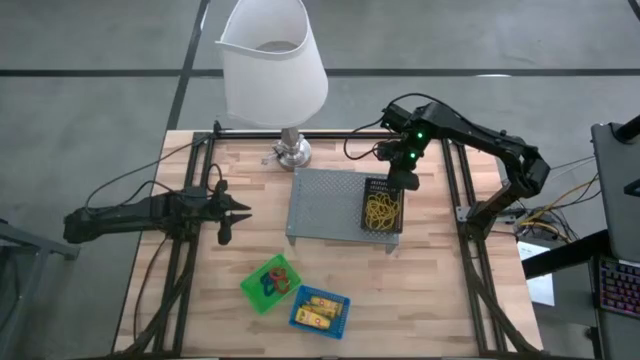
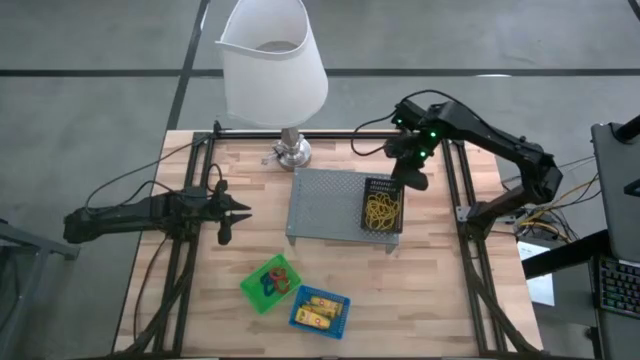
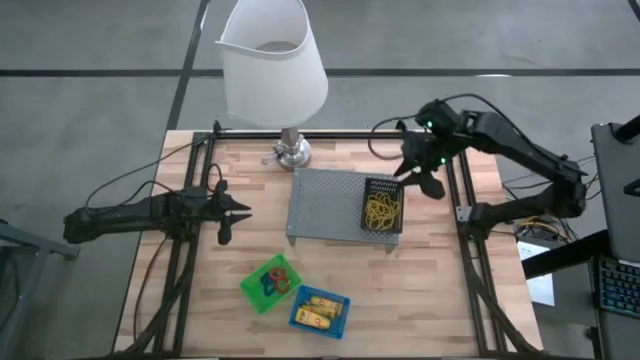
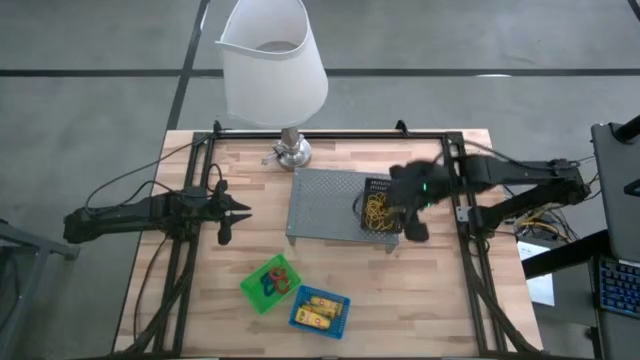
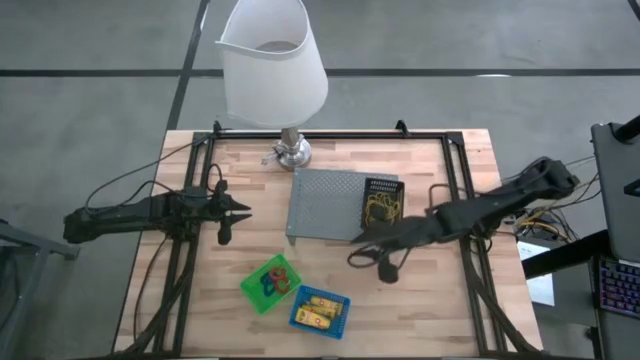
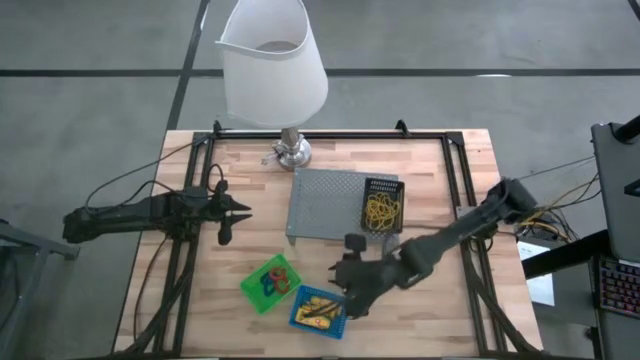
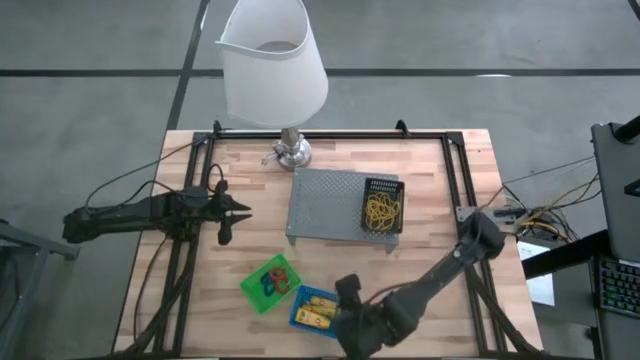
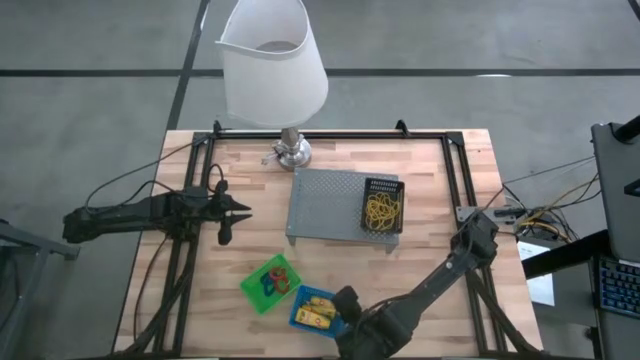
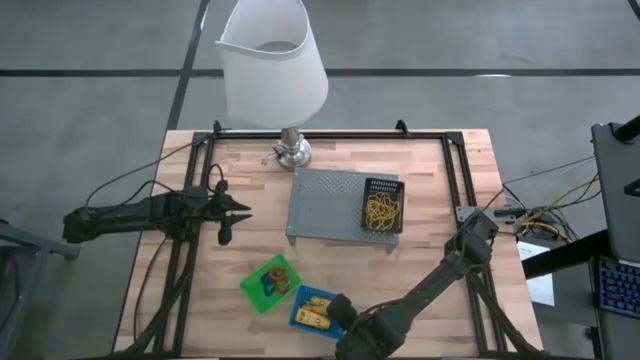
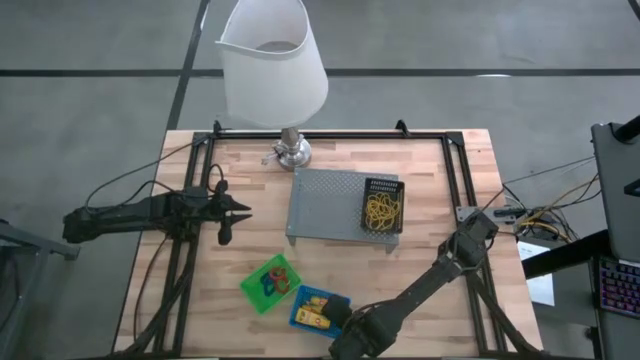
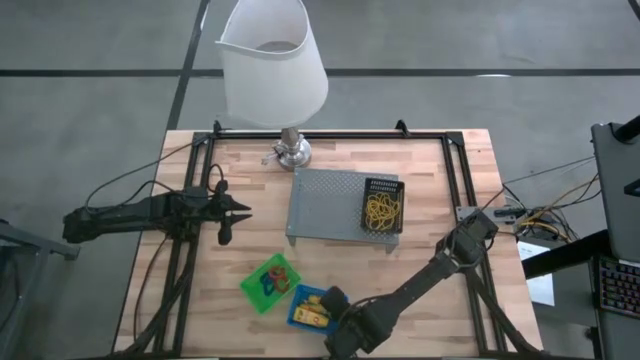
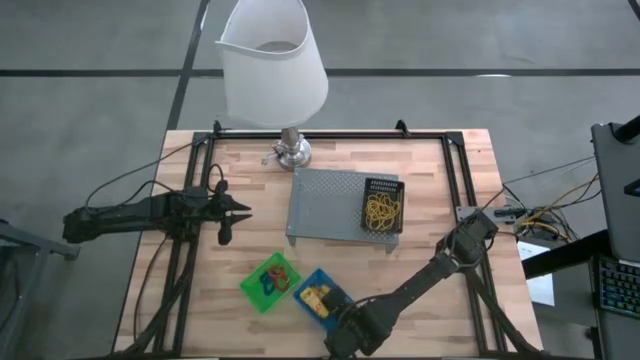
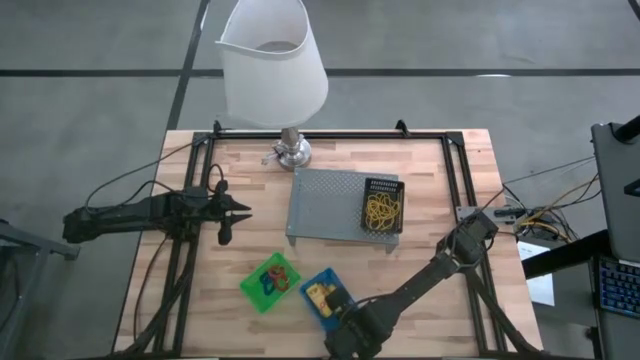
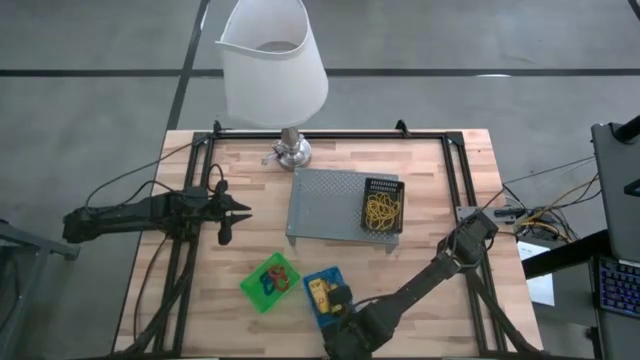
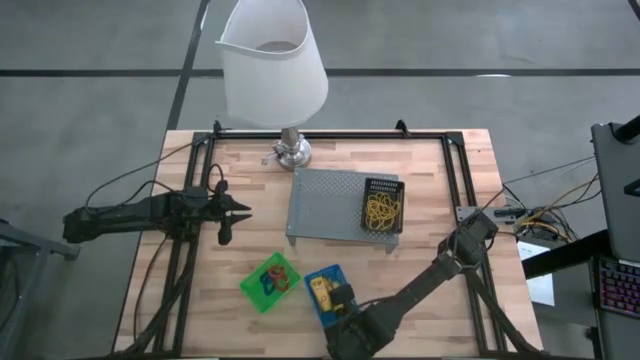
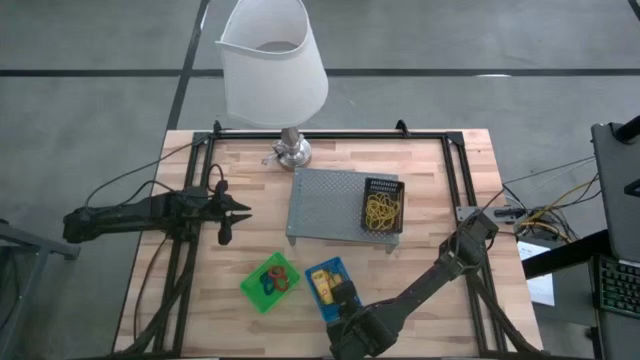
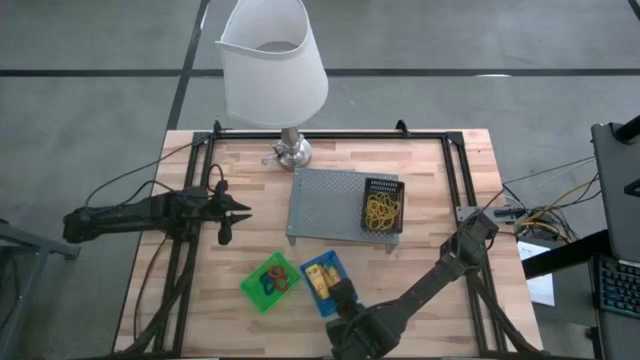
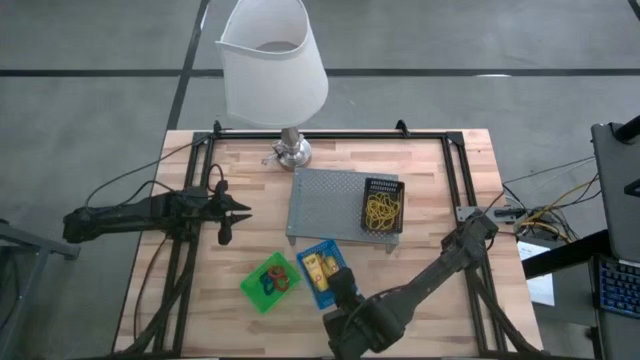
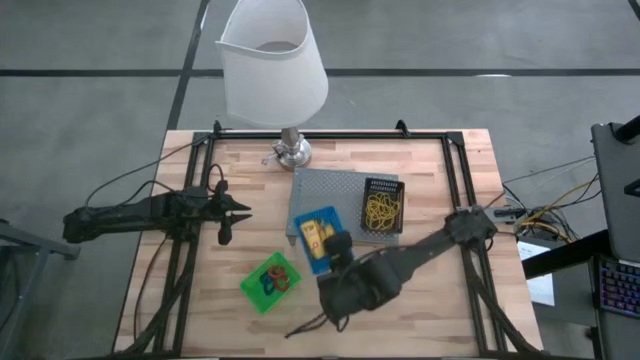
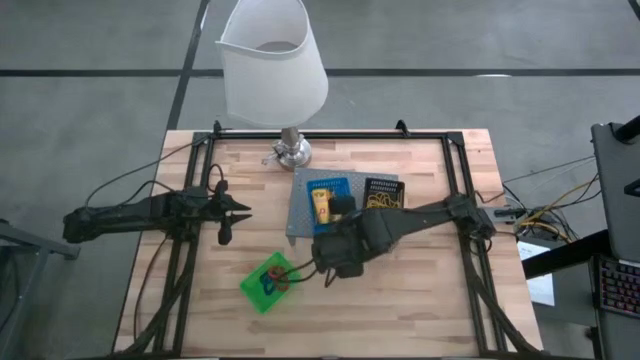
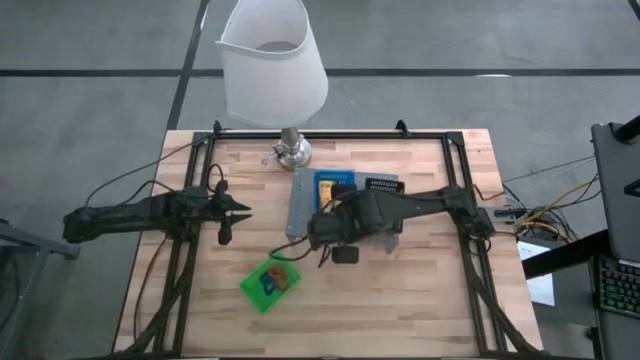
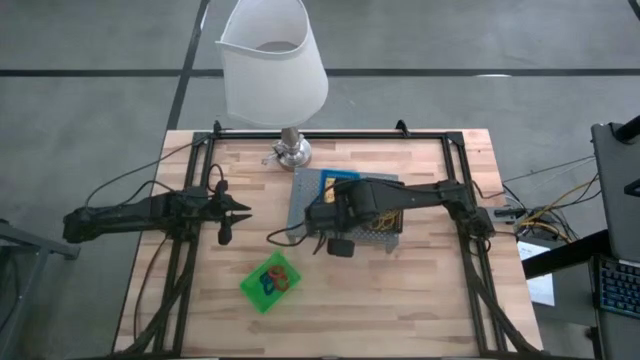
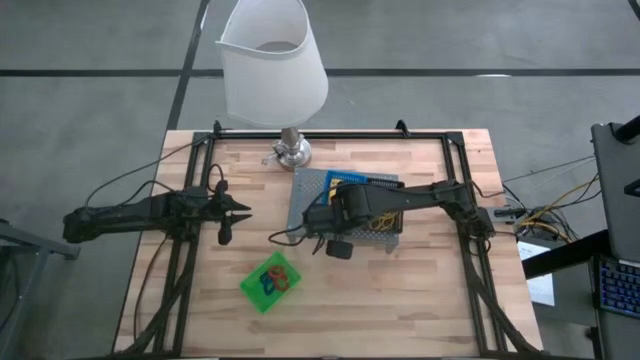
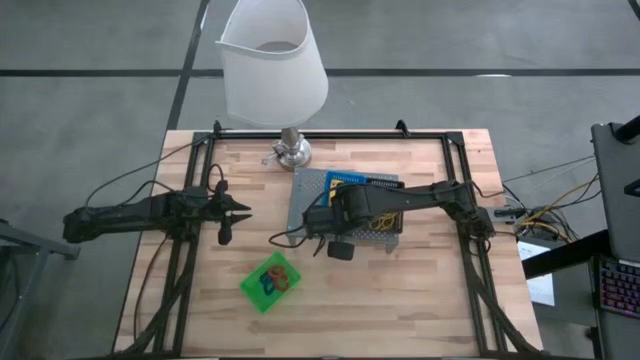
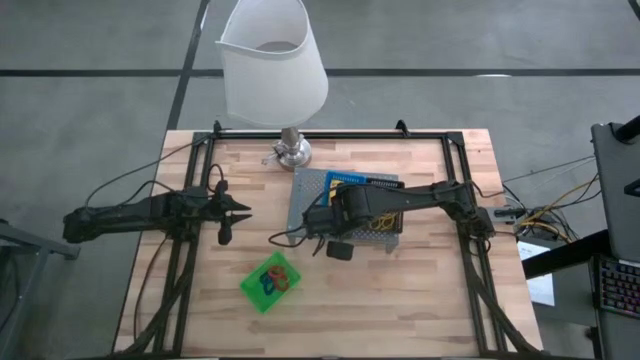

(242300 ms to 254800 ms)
Task: Pick & Place Office Desk Supplies
Put the blue basket on the shelf

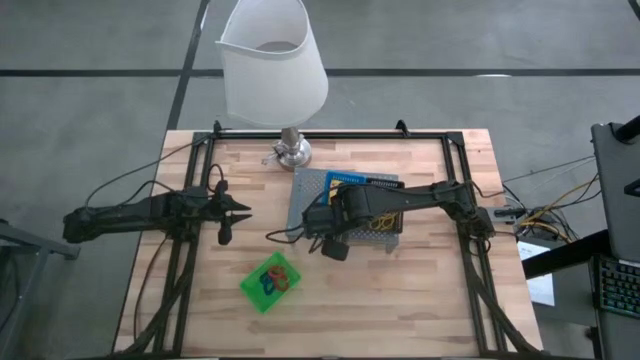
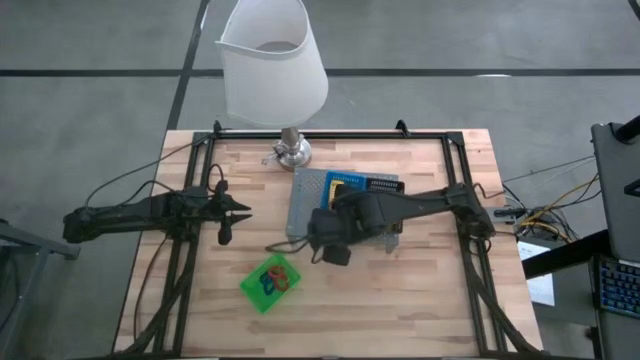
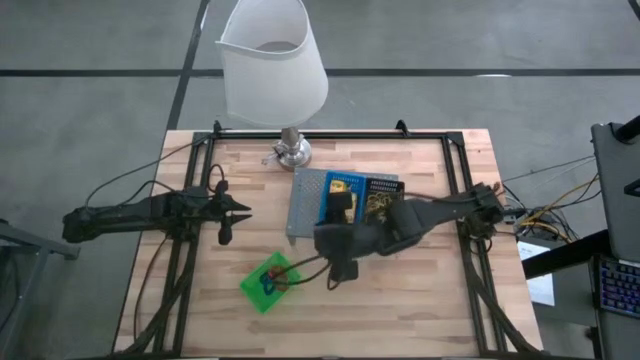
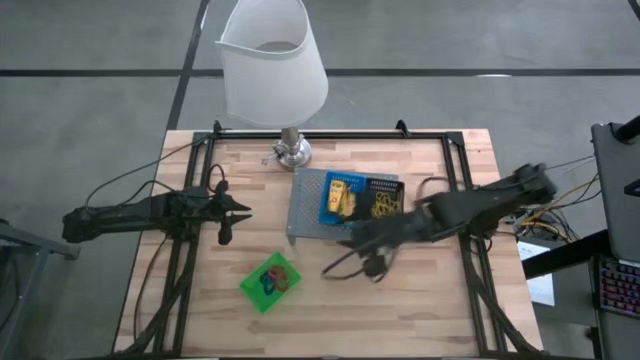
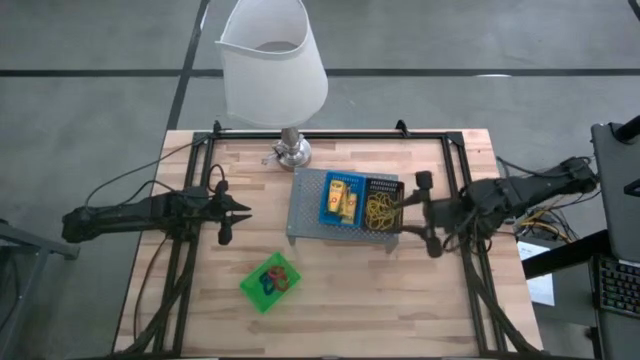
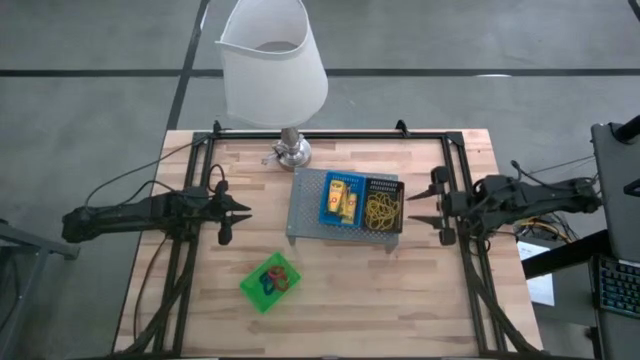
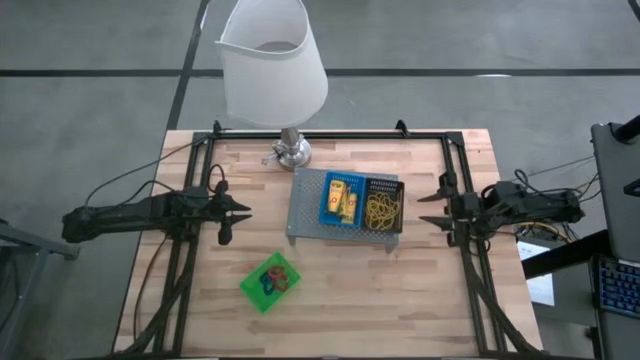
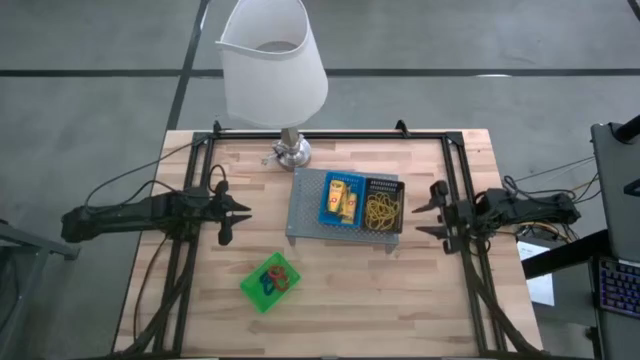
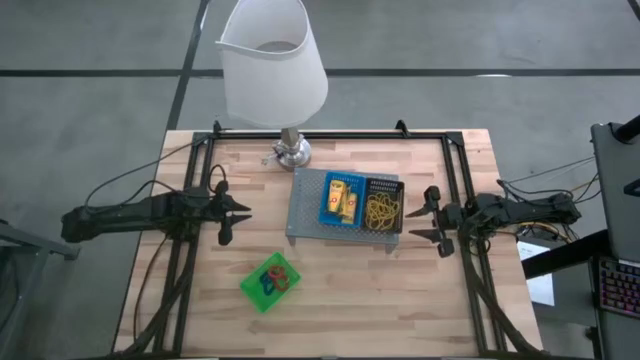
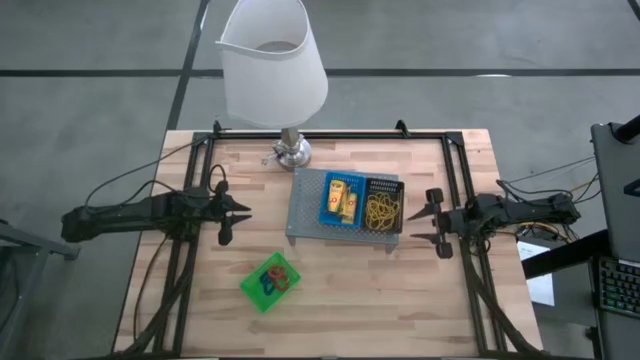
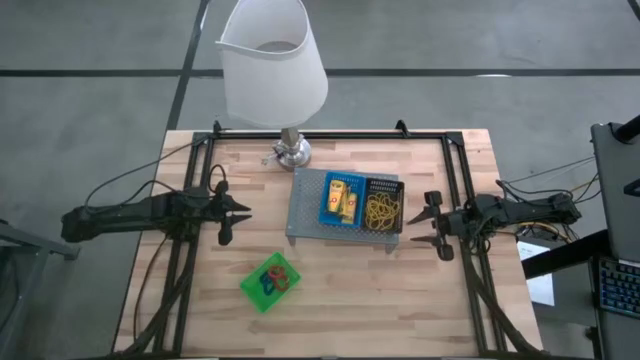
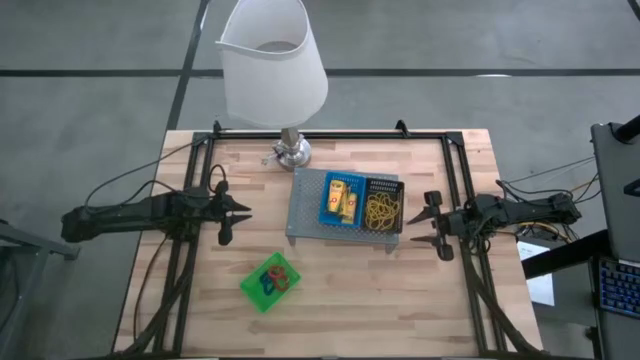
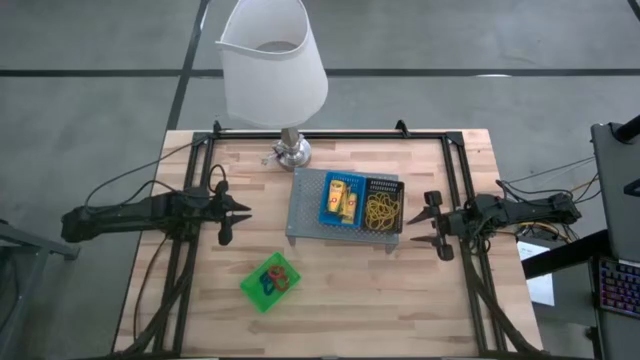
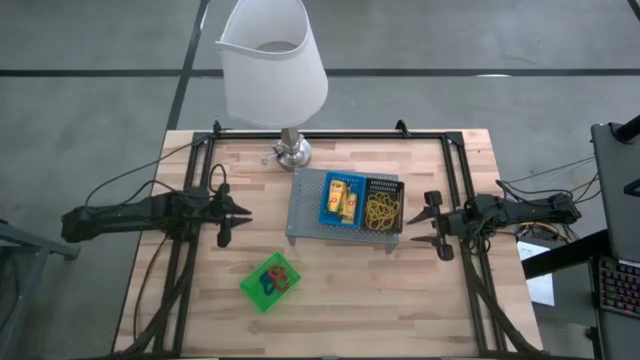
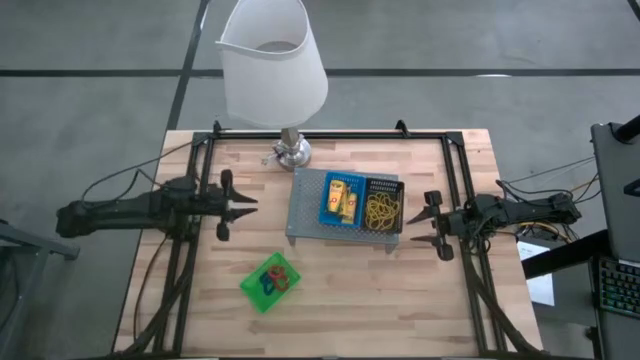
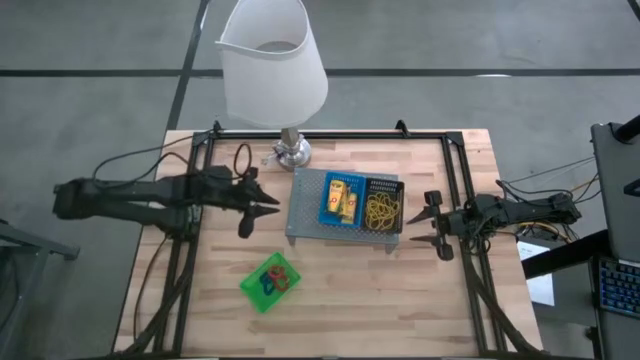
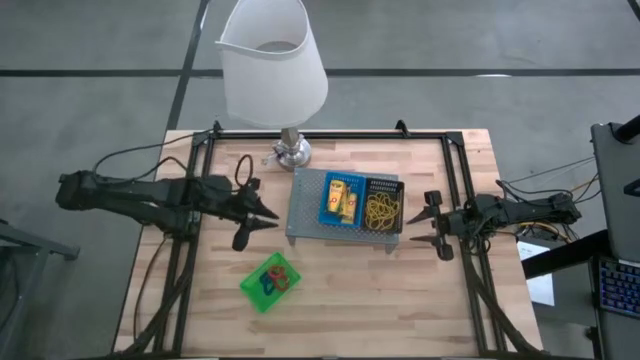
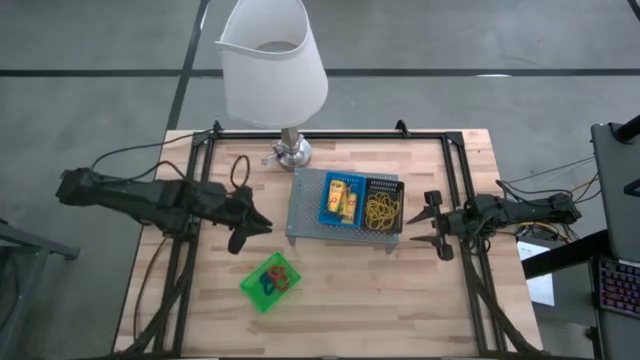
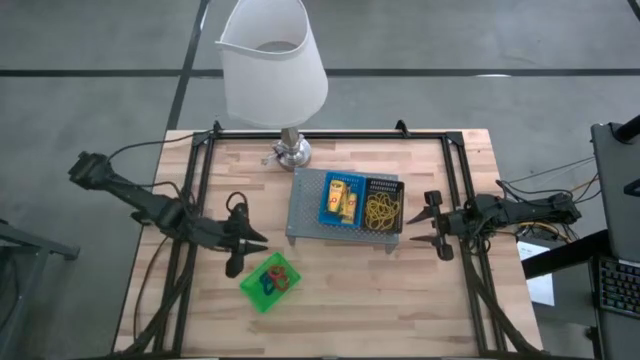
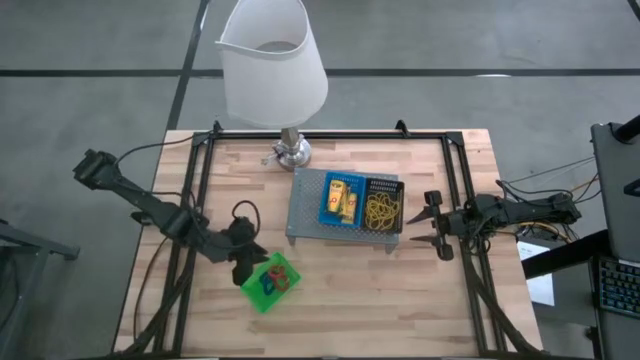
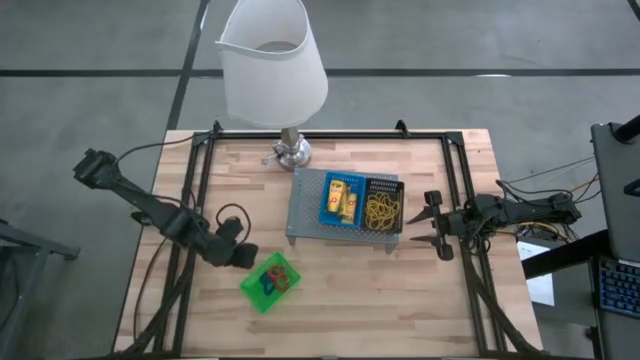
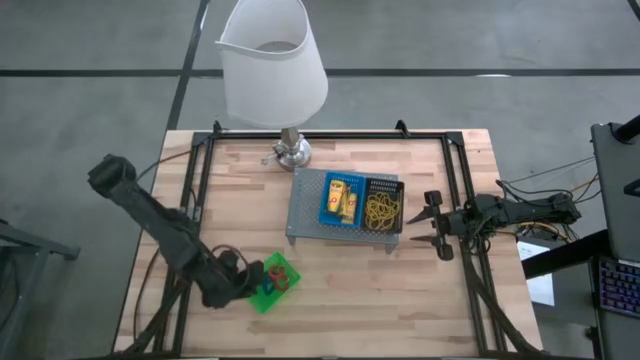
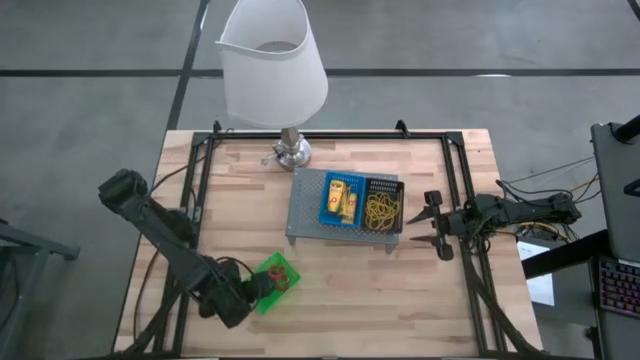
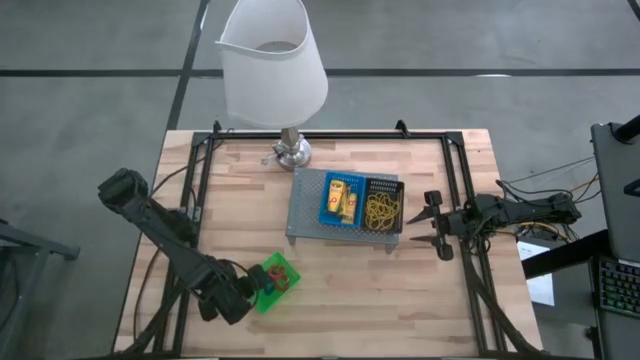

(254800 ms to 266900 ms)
Put the green basket on the shelf
